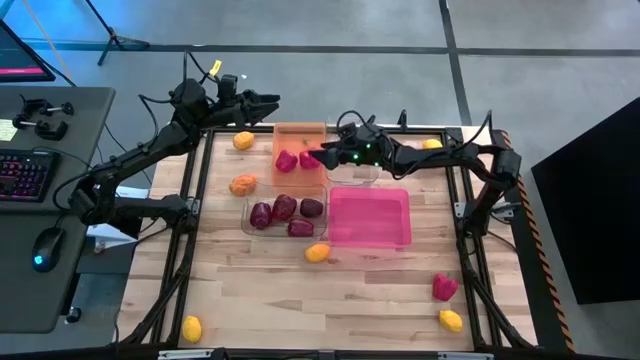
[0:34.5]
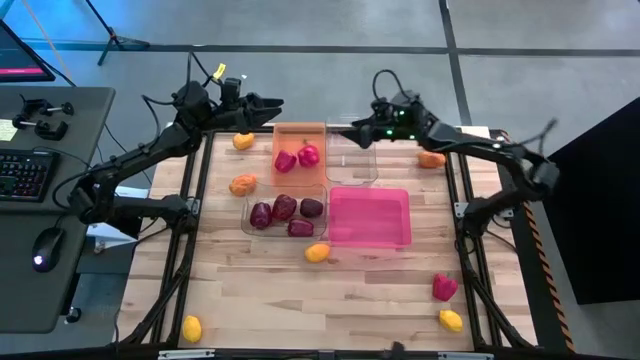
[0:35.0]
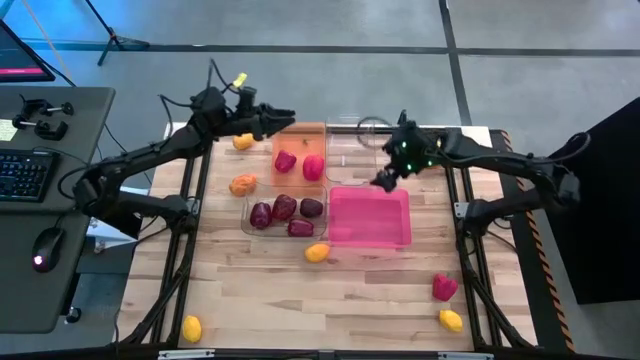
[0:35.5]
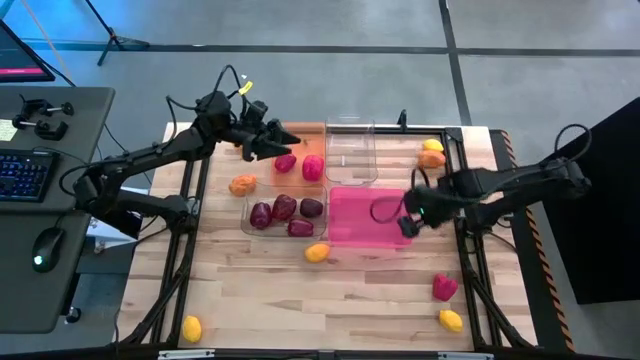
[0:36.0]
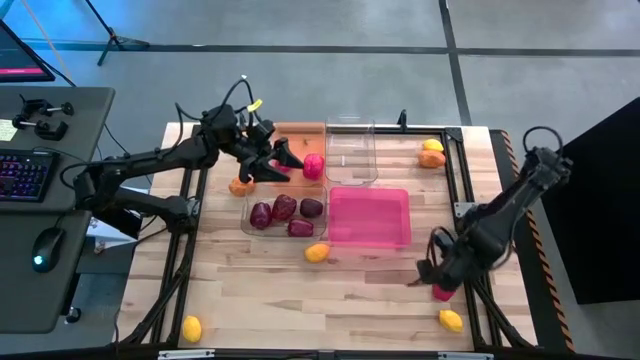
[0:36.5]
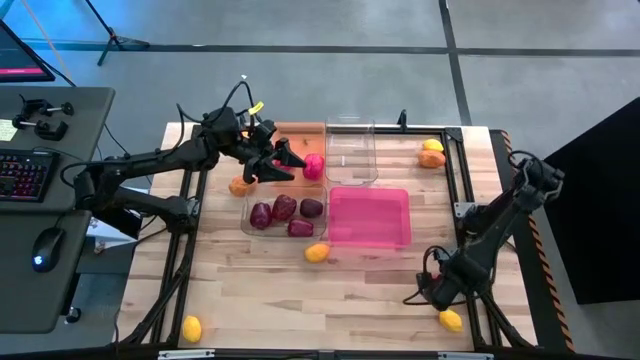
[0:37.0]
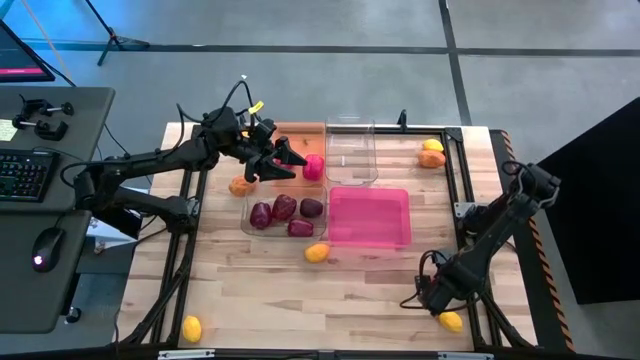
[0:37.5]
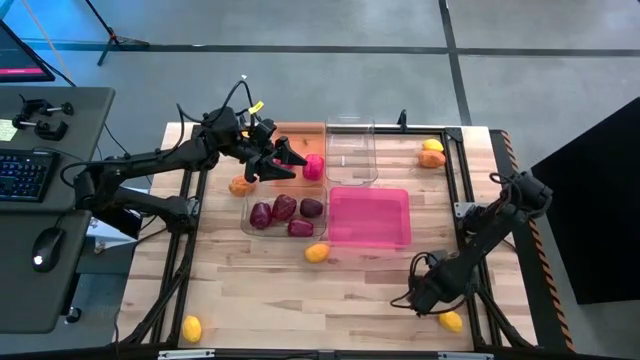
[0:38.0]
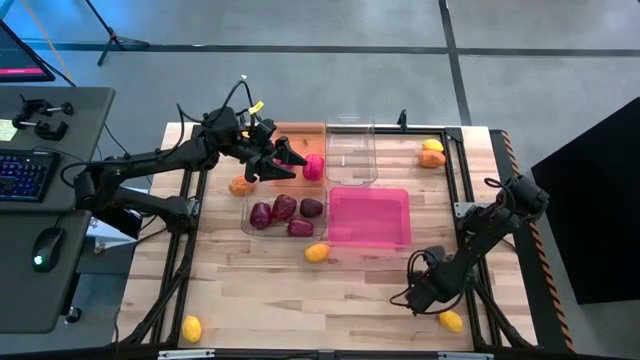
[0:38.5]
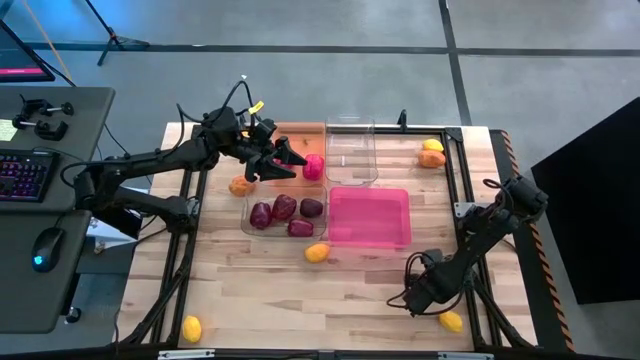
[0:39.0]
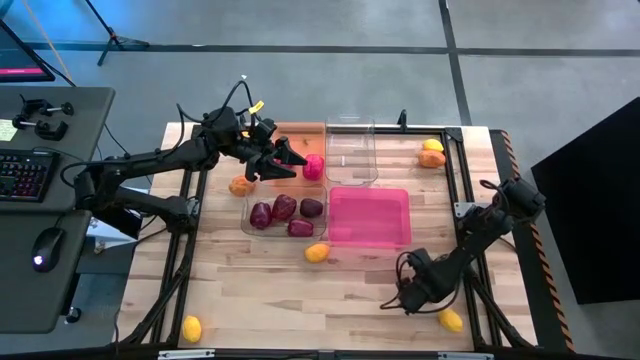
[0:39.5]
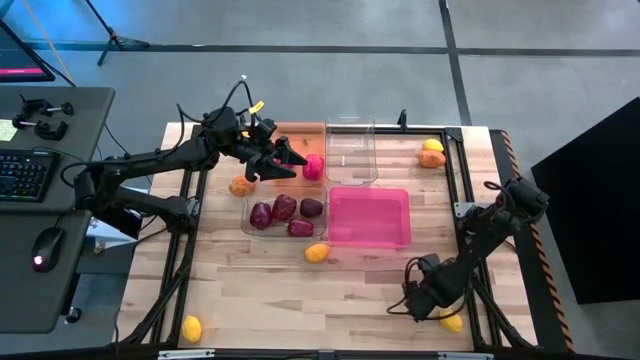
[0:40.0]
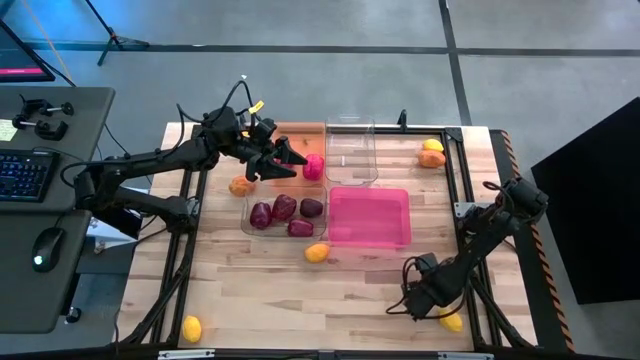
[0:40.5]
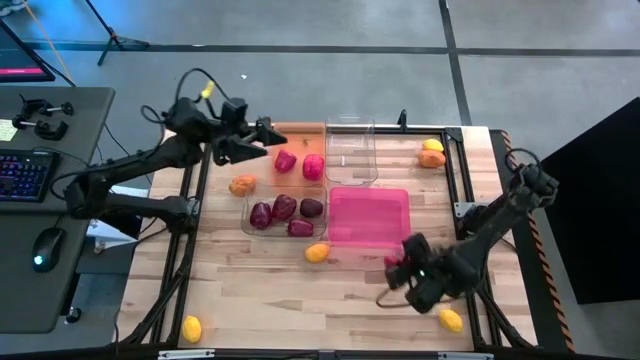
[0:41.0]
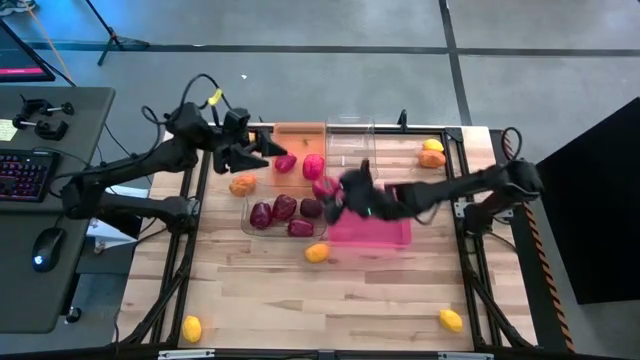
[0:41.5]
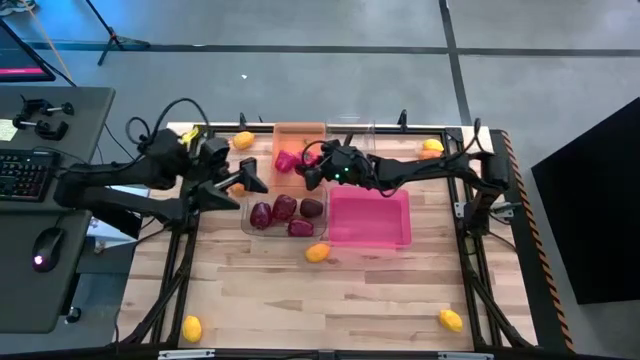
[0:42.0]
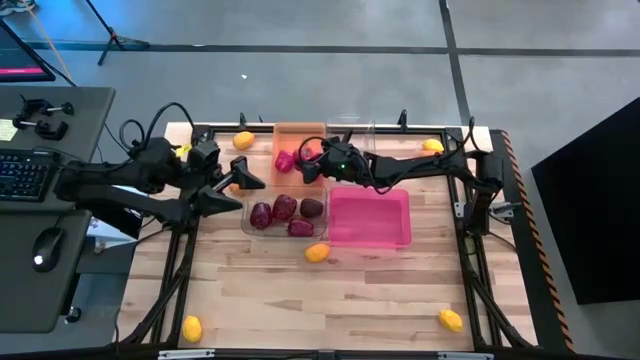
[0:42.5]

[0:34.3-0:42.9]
Task: Sort produce into baskets
Put the bell pepper into the orange bin

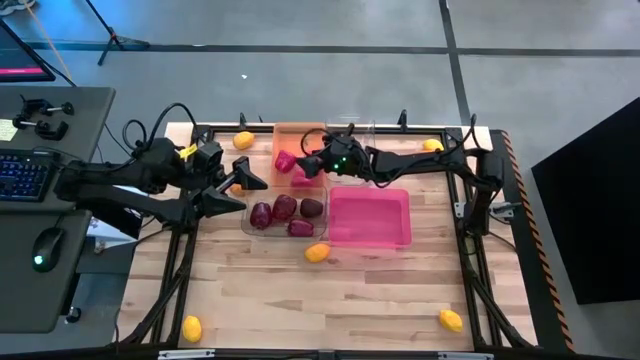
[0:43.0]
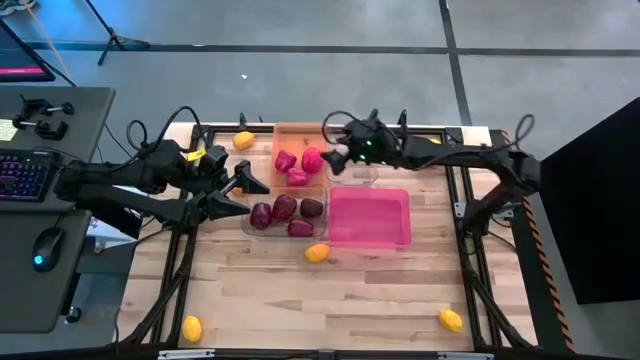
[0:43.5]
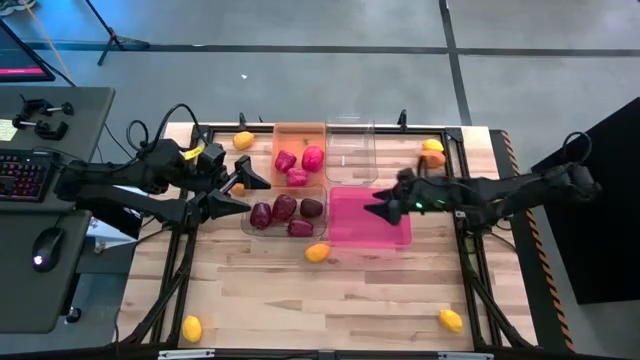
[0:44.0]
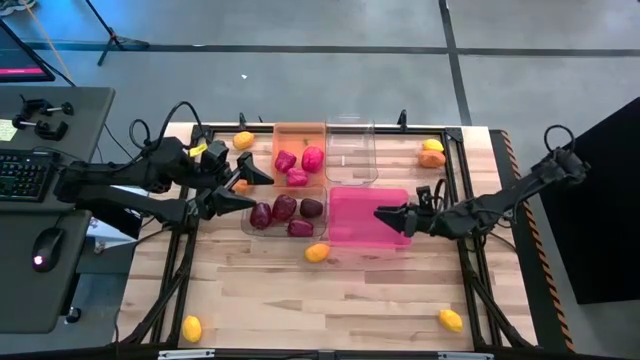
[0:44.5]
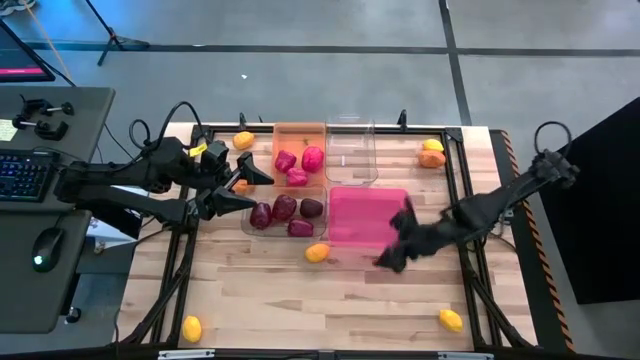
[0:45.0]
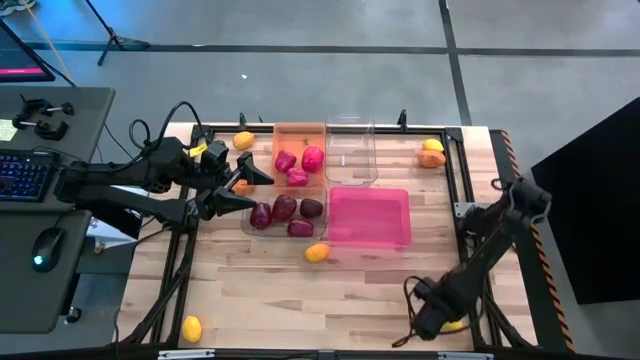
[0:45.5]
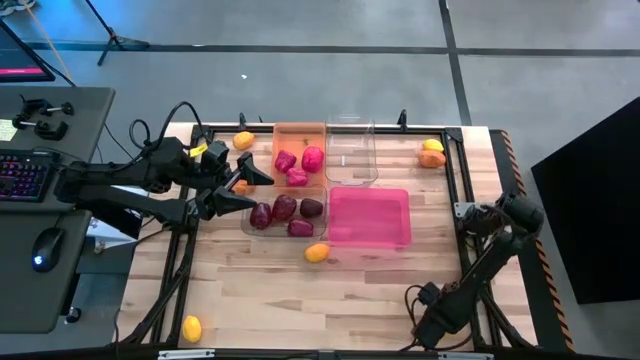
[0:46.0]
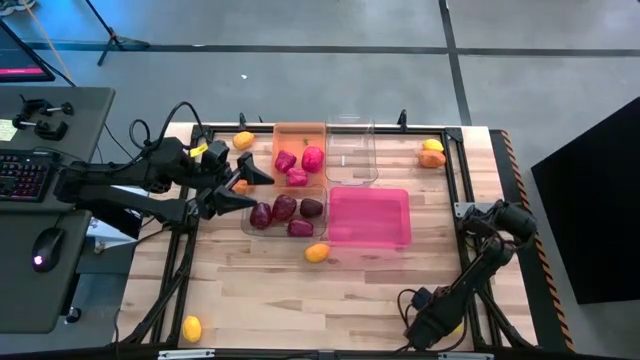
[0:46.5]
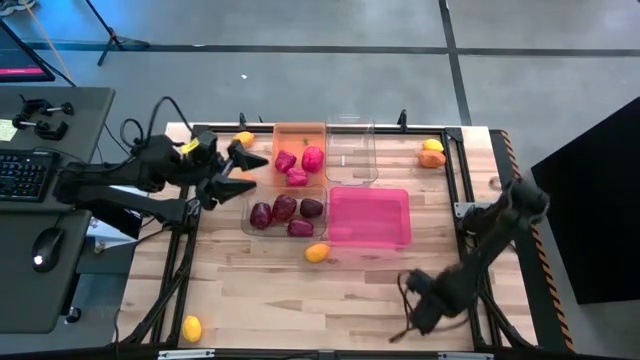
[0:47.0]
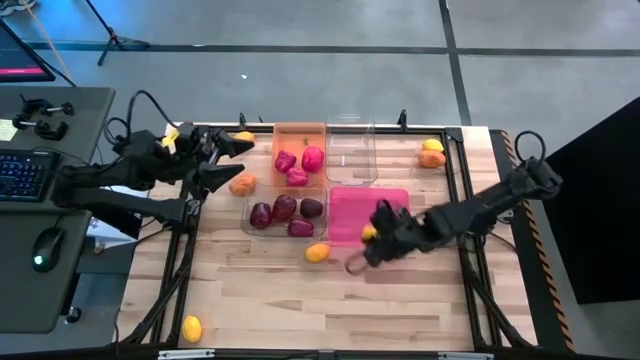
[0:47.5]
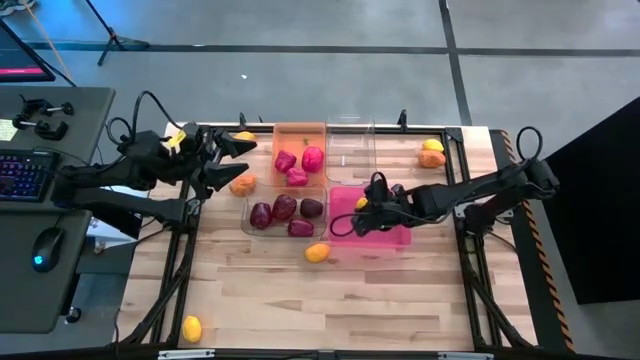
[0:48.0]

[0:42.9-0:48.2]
Put the lemon into the pink bin

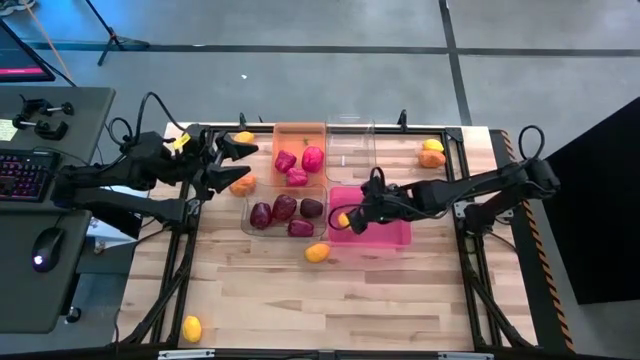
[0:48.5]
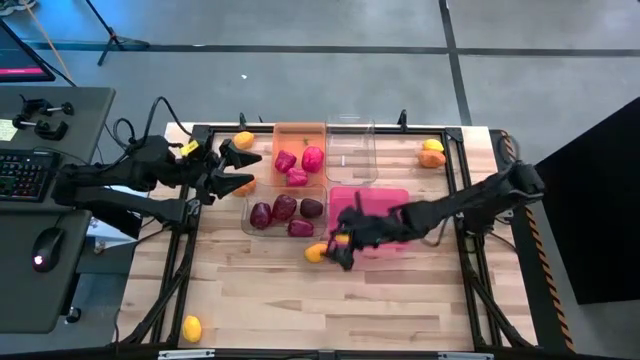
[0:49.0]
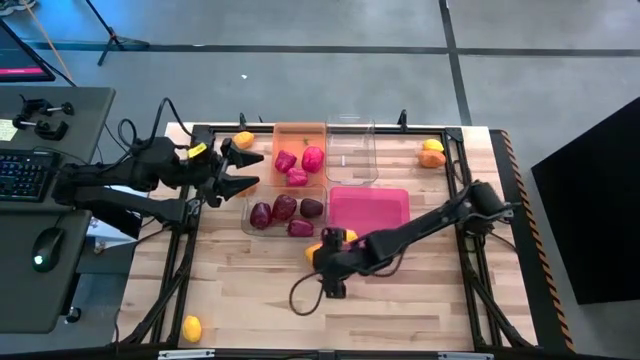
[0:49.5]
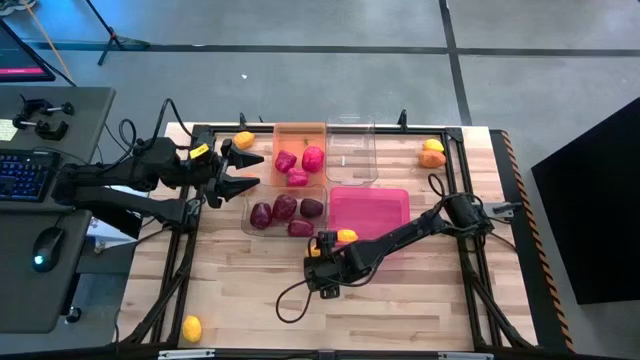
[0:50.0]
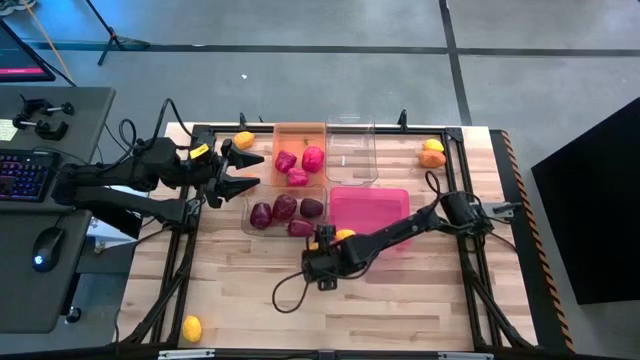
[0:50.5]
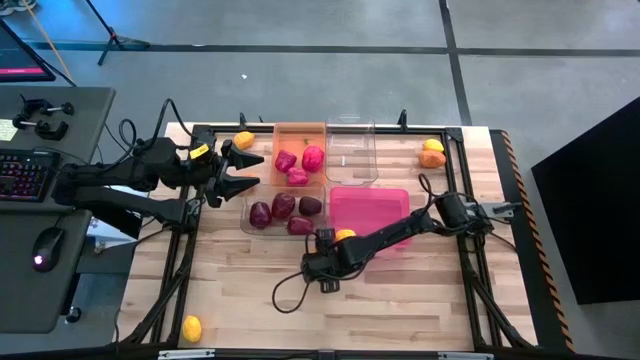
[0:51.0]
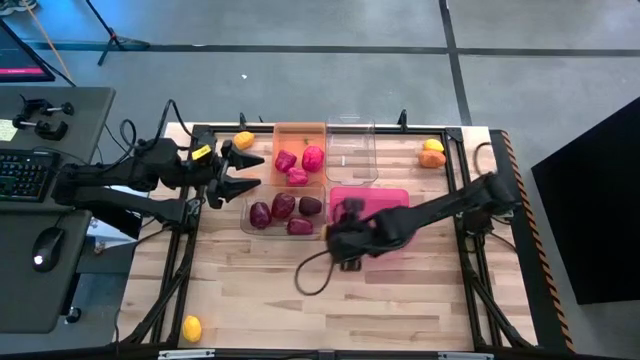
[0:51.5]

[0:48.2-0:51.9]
Put the lemon into the pink bin

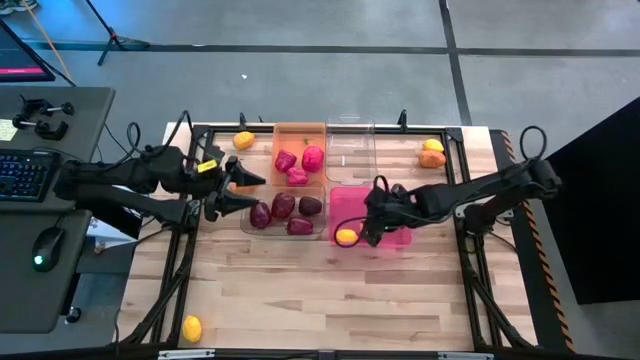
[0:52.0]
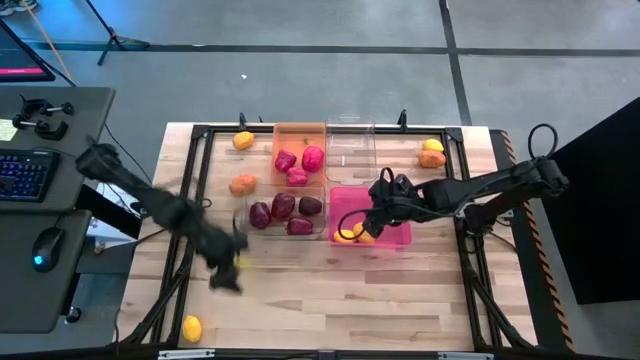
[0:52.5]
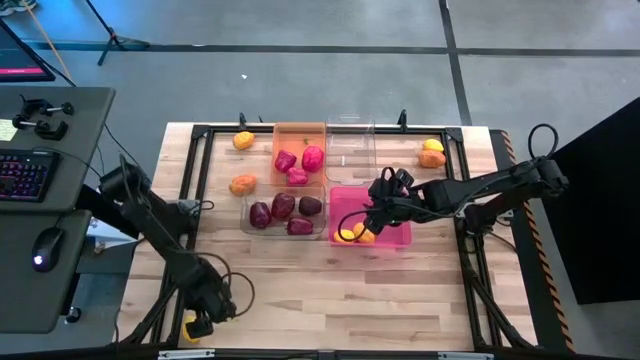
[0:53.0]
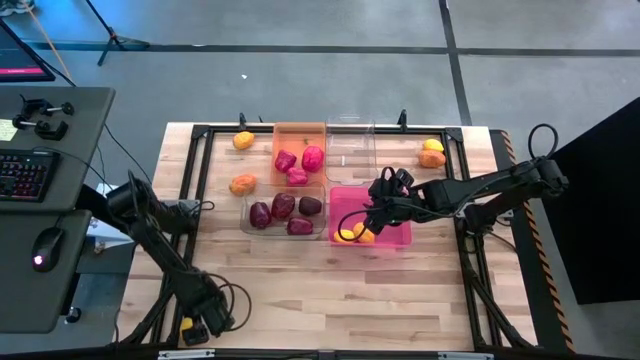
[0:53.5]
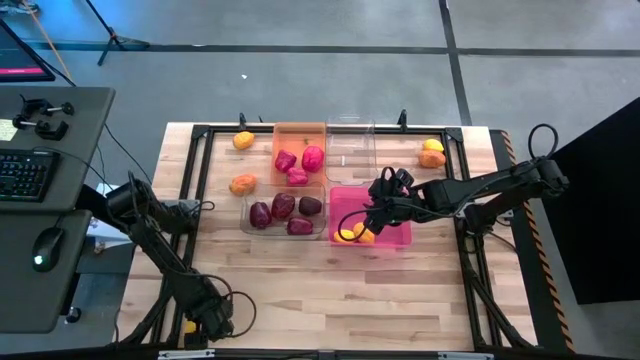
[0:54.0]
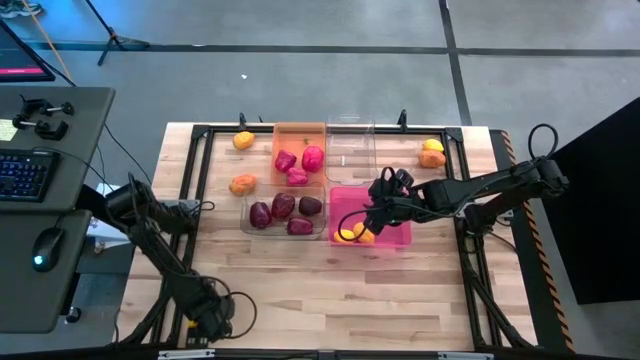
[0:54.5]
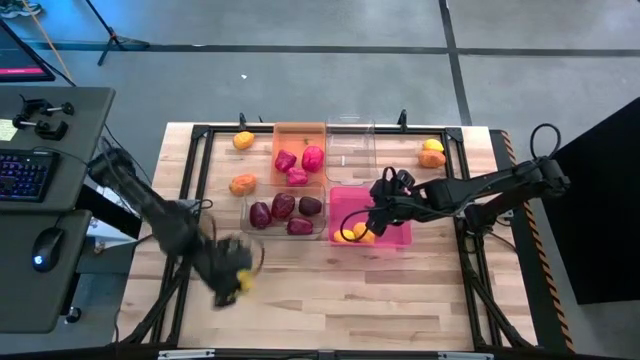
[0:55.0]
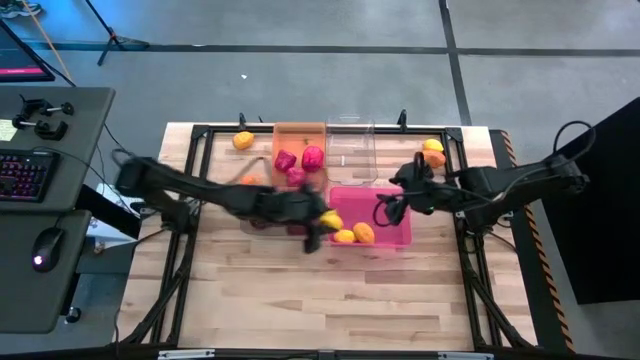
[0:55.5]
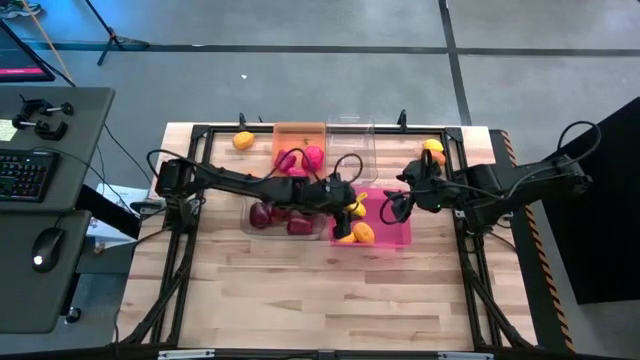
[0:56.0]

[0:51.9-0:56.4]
Put the lemon into the pink bin
